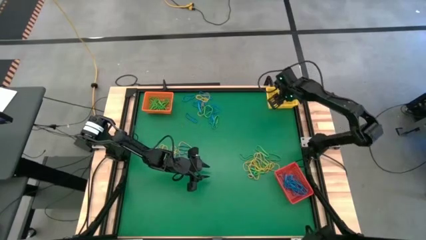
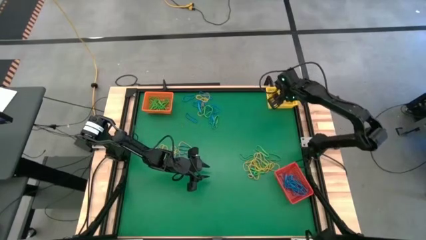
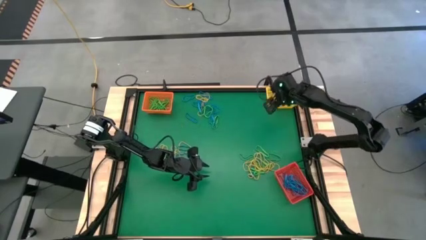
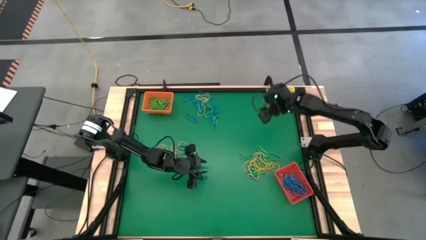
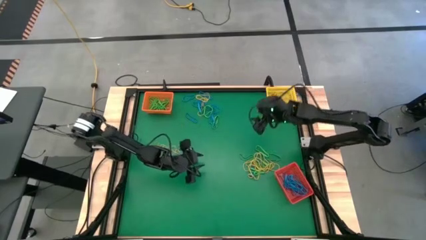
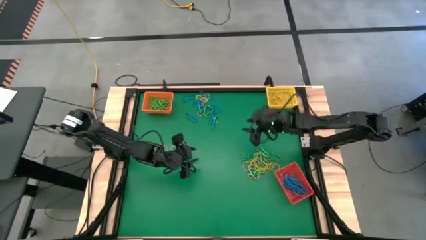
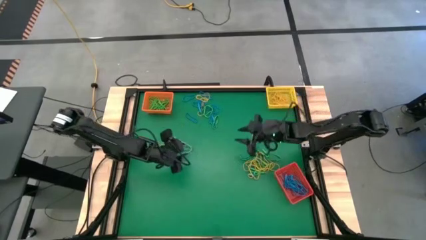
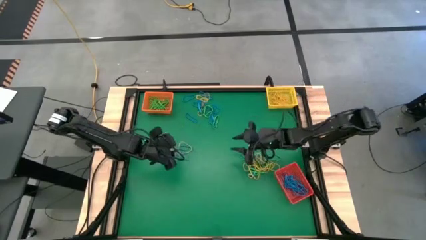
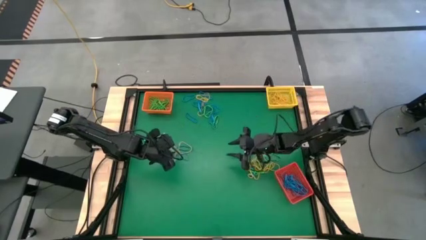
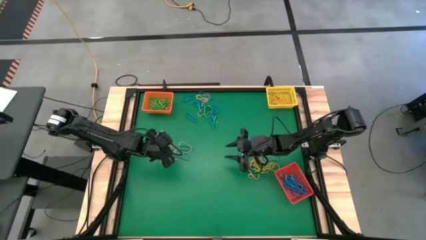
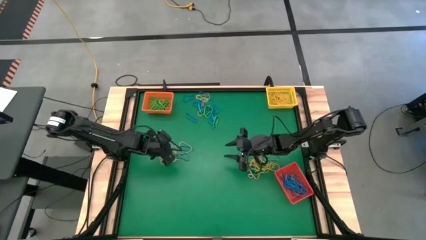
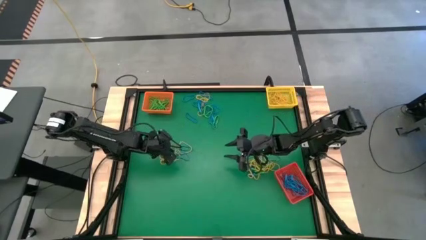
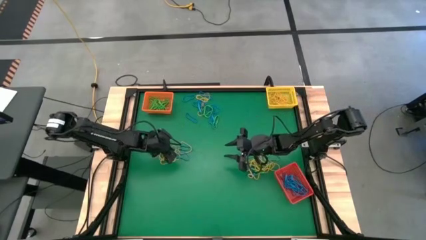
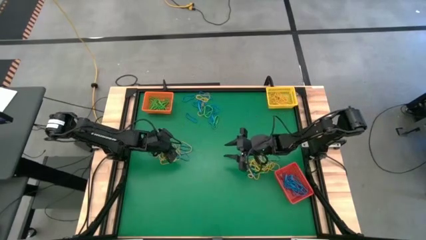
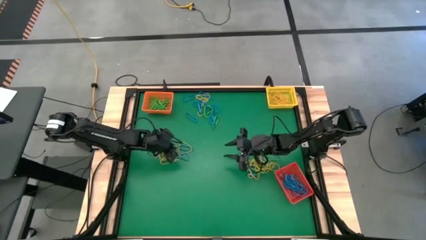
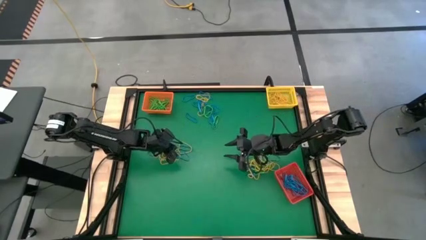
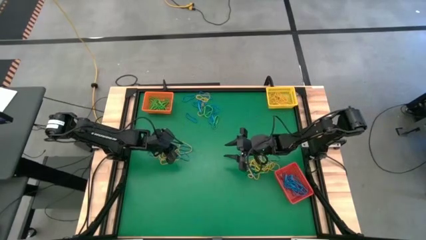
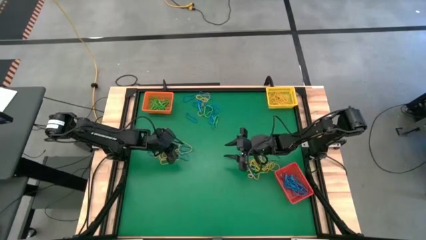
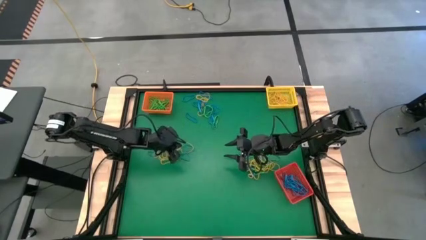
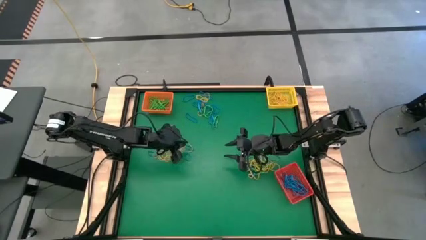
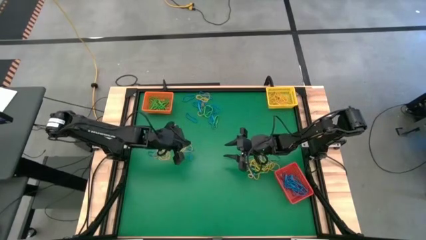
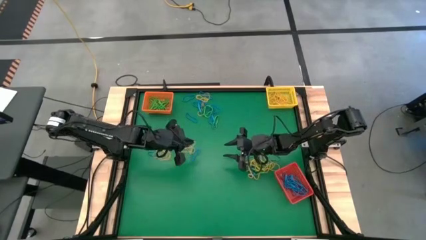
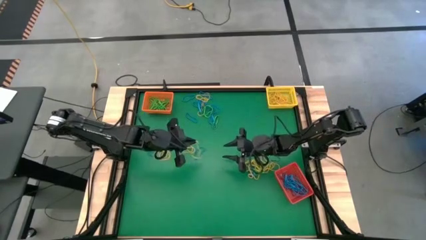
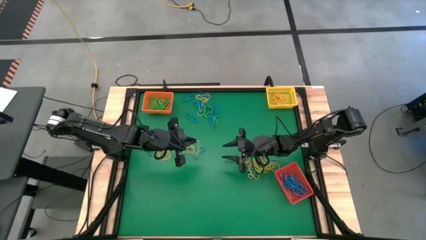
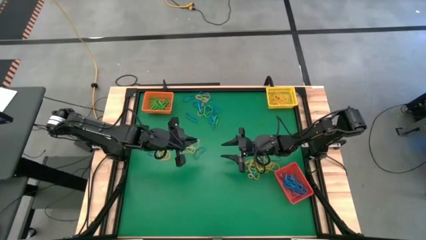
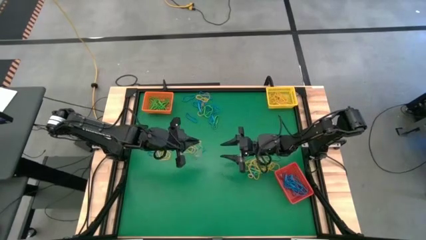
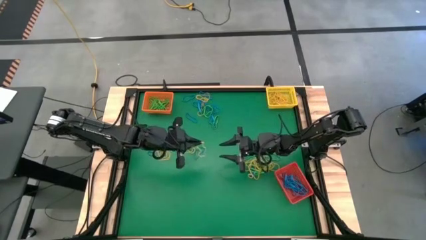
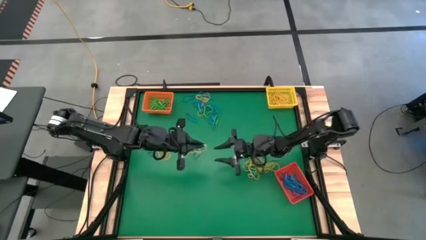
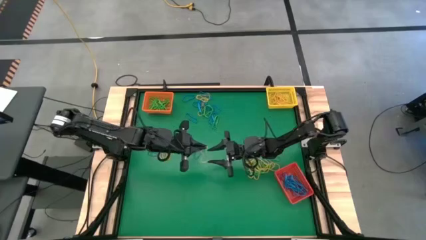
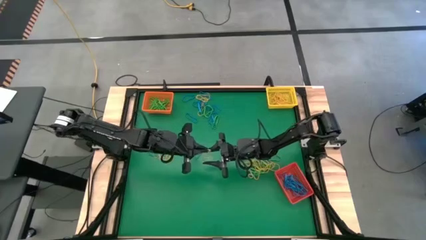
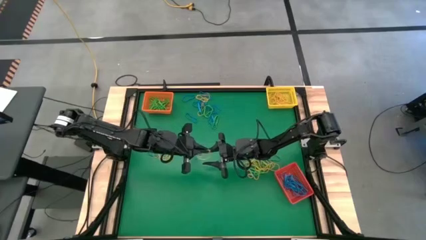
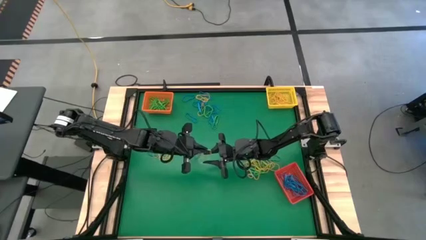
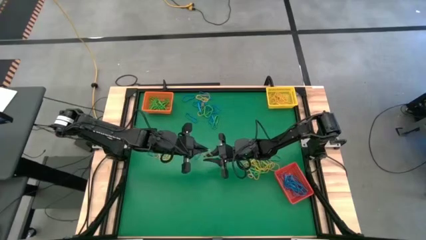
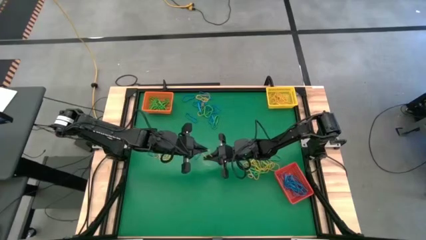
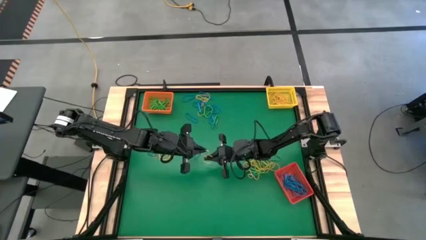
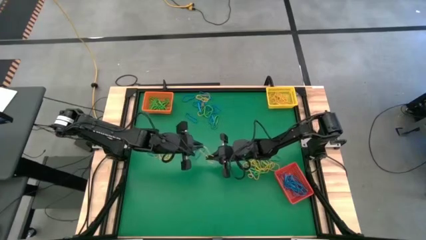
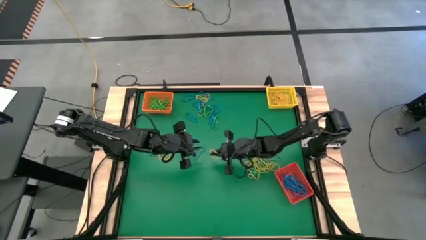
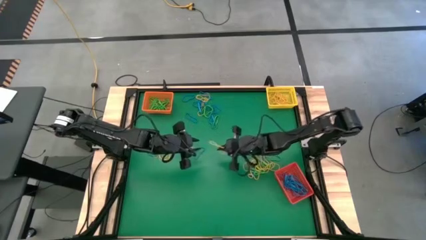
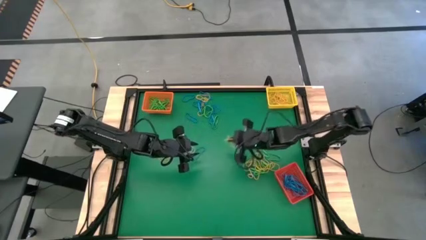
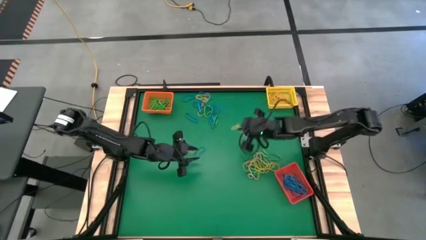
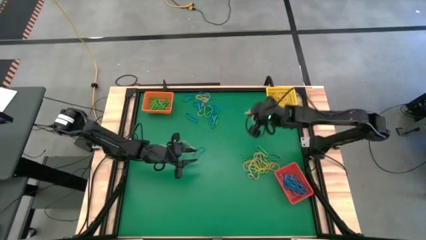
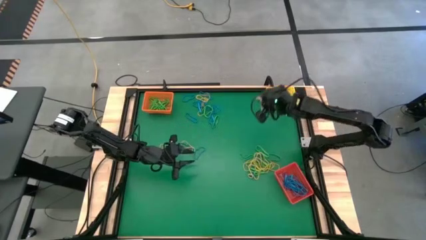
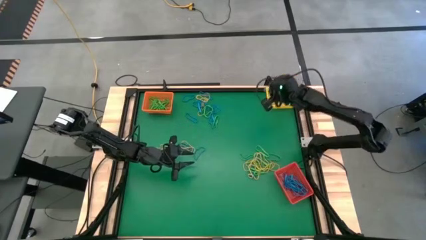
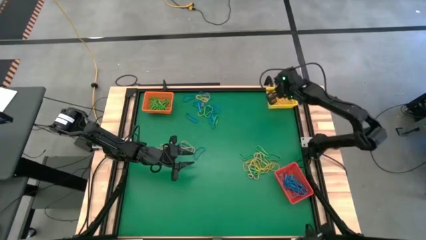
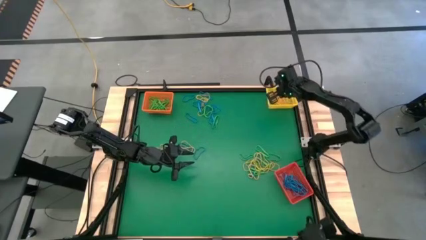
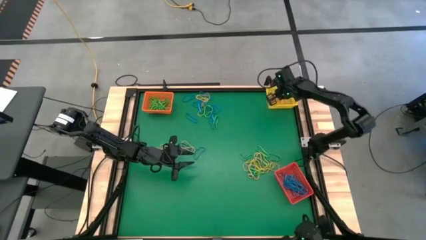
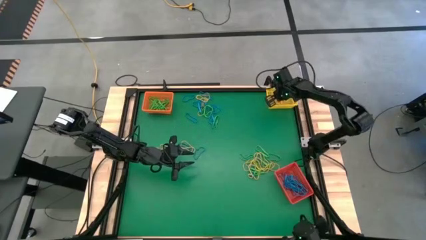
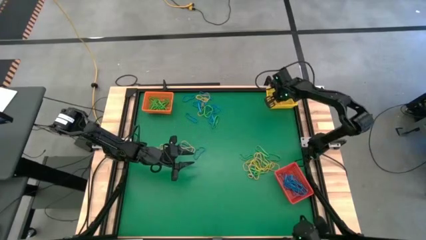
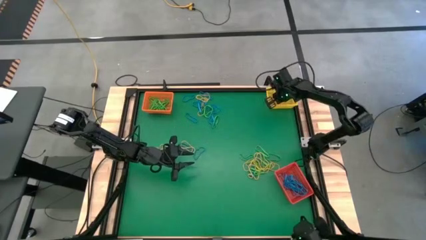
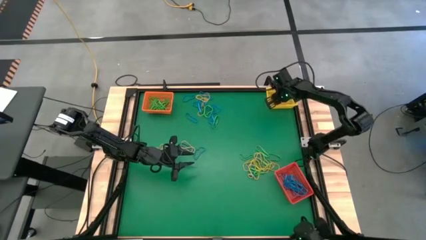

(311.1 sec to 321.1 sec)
Task: Sort rubber bands into baskets
Put the yellow rubber band into the yellow bin

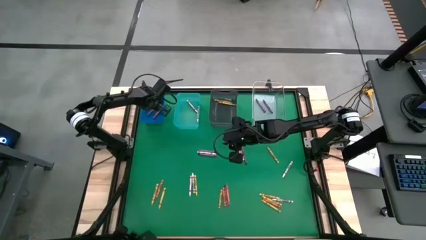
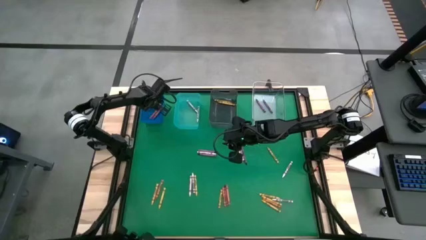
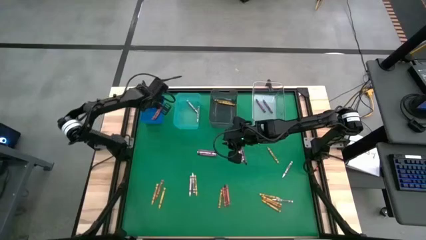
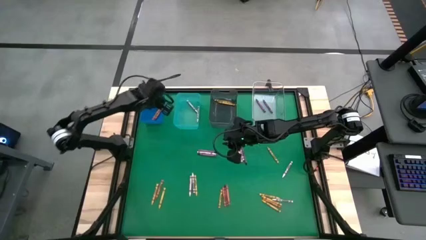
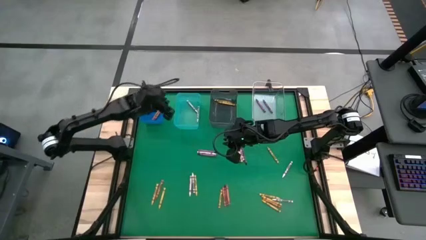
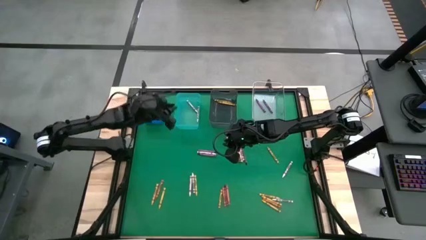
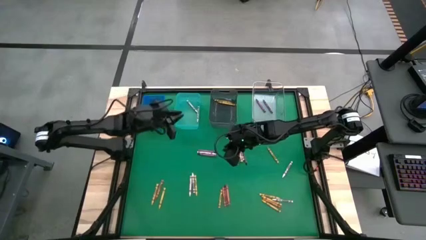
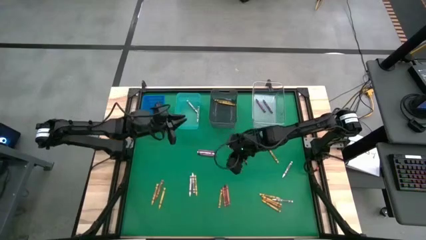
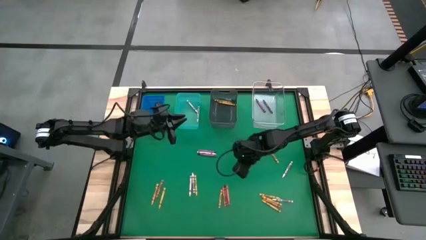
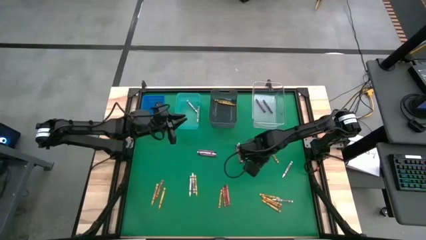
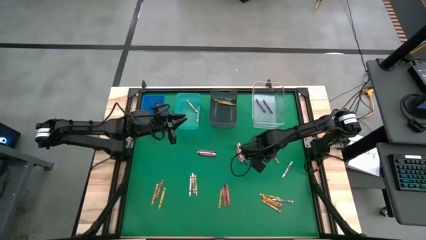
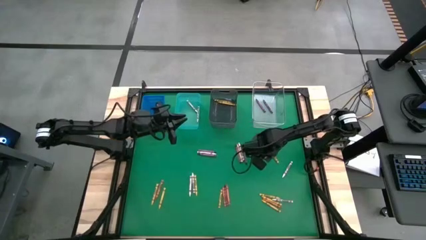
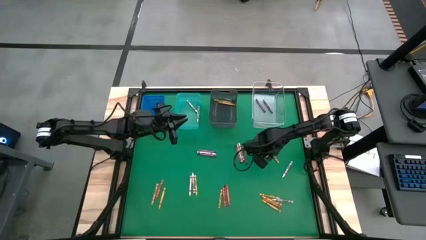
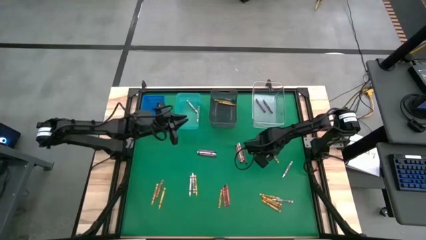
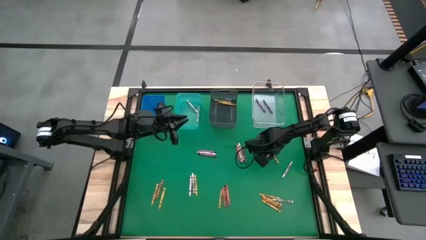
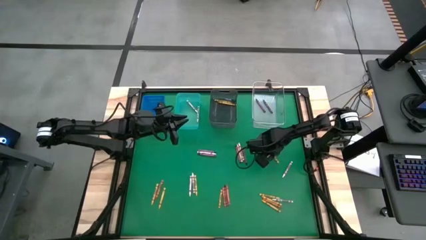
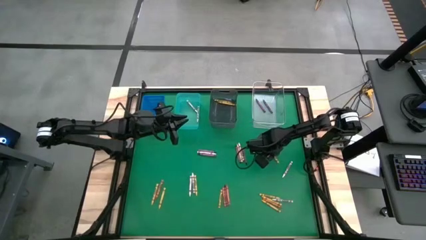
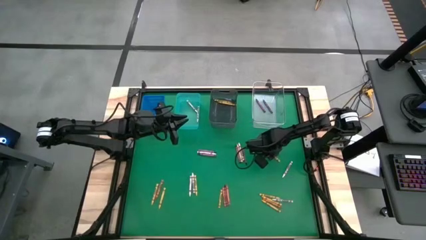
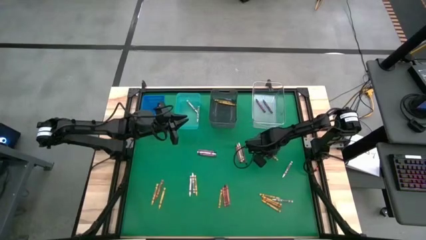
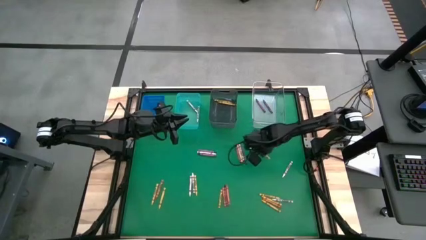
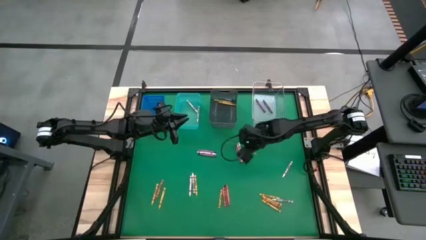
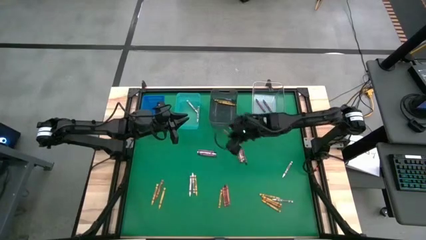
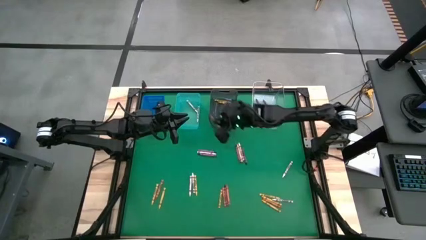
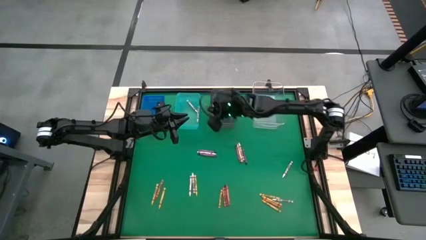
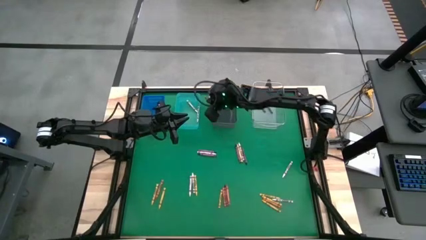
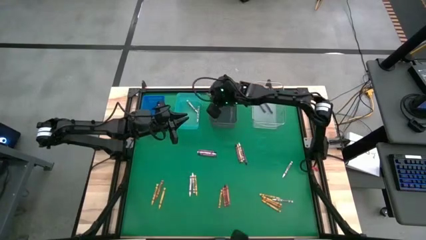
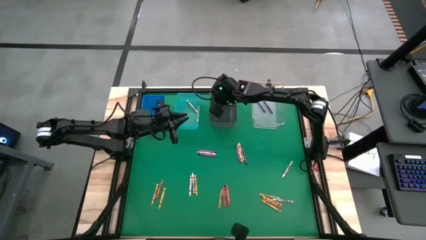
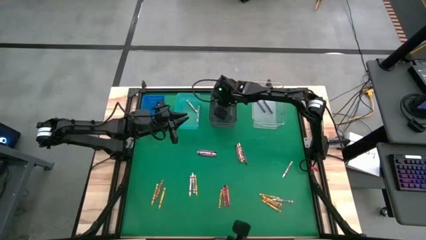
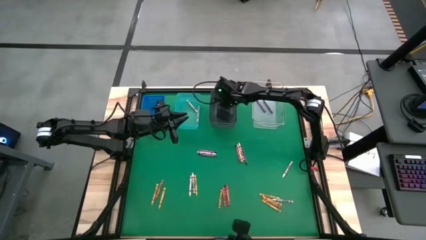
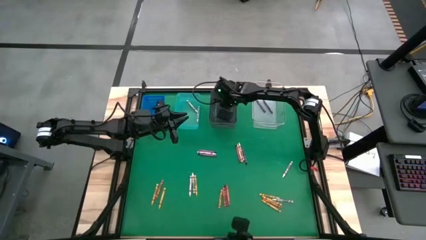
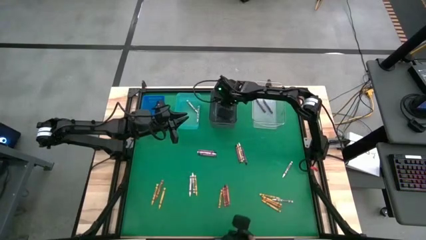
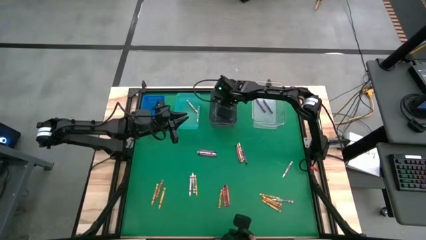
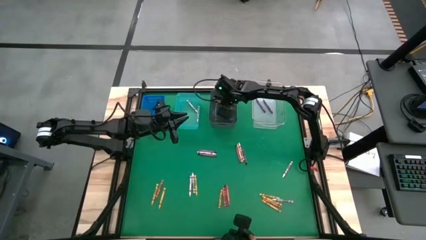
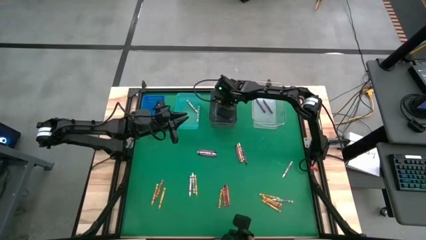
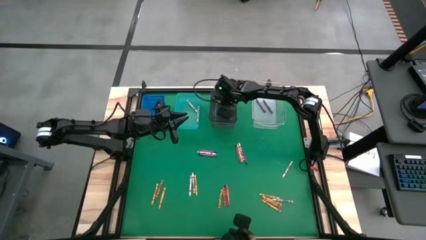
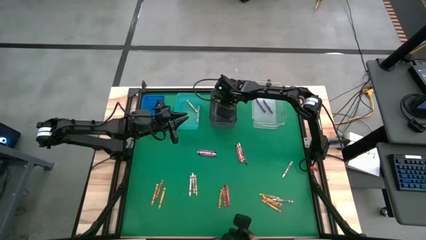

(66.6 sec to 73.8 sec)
Task: Sort crayons
Put the yellow crayon into the black bin
